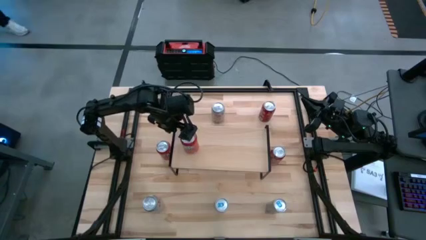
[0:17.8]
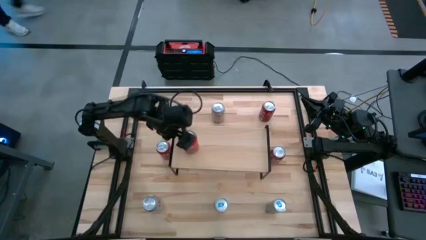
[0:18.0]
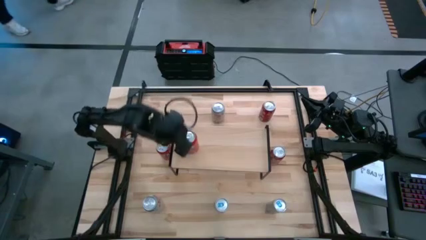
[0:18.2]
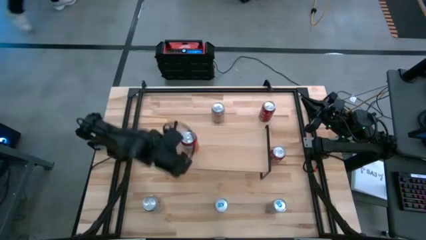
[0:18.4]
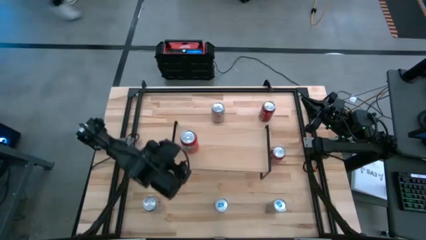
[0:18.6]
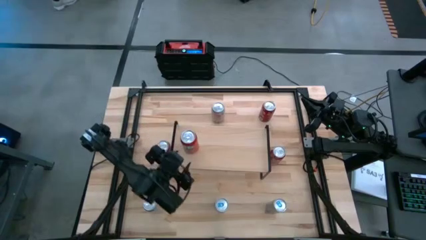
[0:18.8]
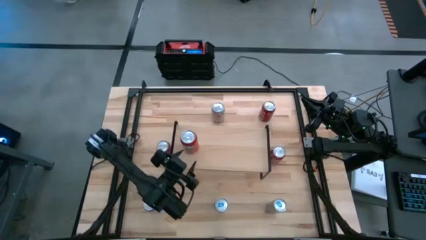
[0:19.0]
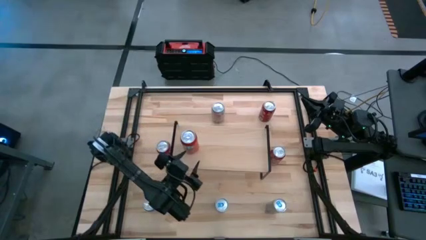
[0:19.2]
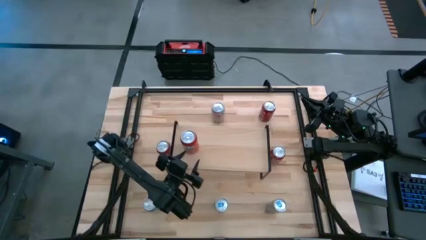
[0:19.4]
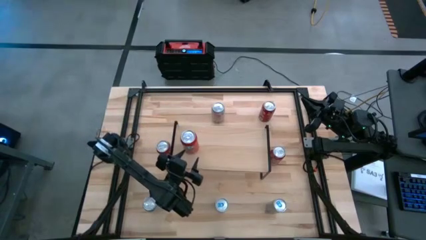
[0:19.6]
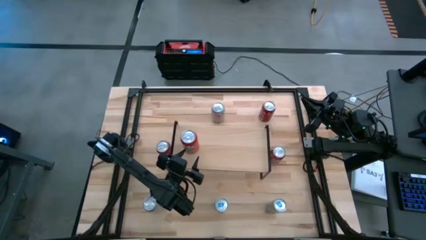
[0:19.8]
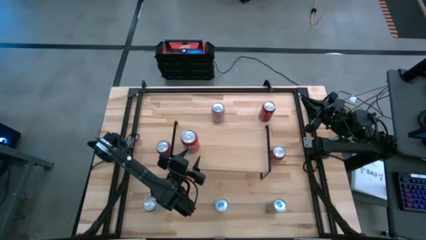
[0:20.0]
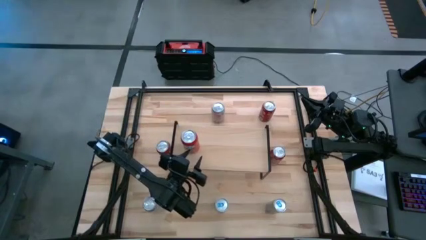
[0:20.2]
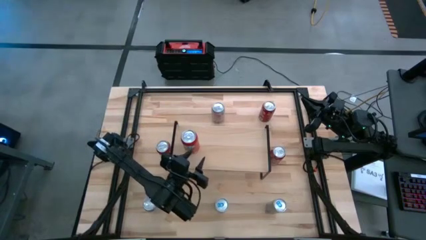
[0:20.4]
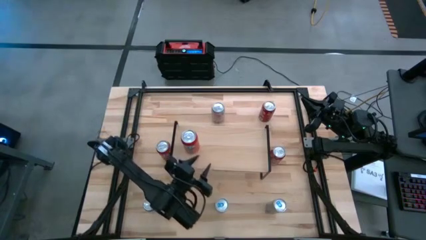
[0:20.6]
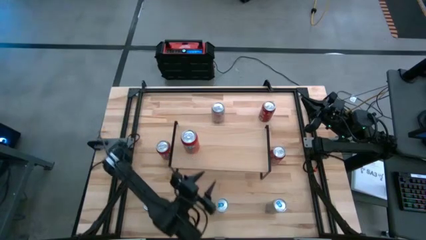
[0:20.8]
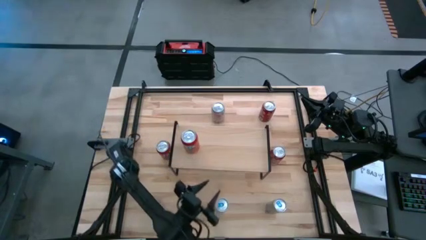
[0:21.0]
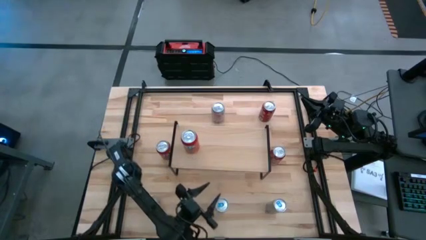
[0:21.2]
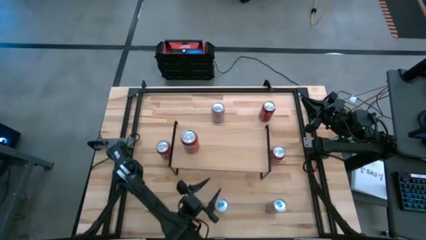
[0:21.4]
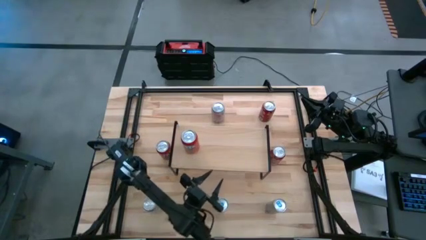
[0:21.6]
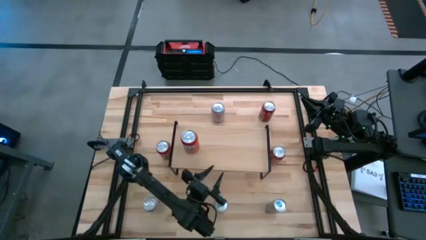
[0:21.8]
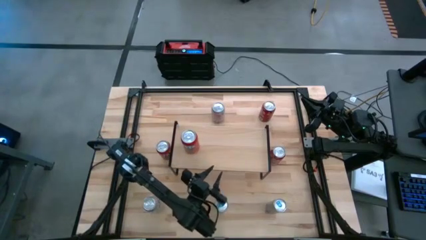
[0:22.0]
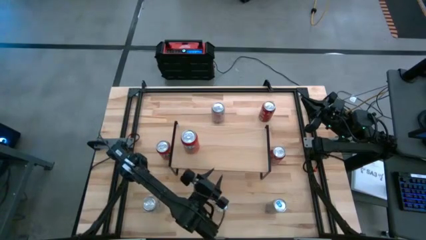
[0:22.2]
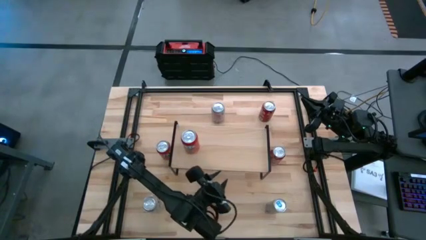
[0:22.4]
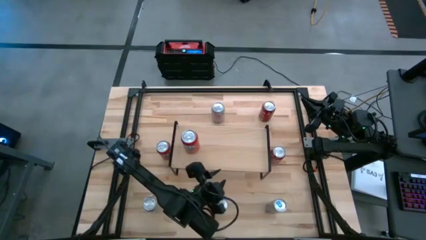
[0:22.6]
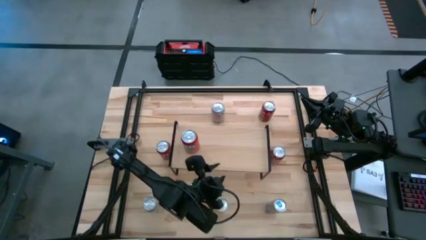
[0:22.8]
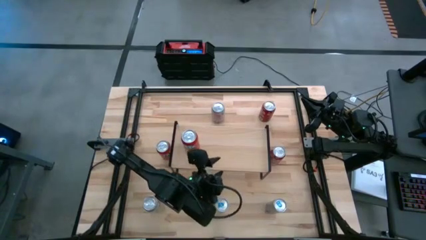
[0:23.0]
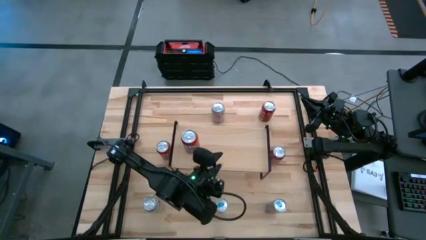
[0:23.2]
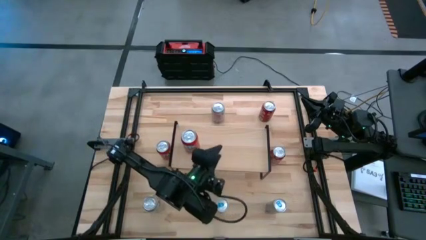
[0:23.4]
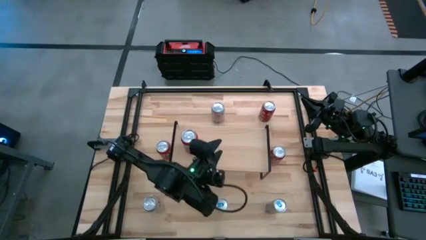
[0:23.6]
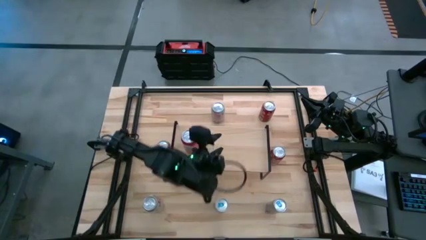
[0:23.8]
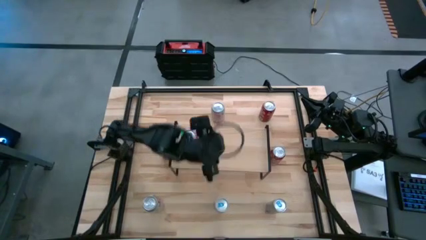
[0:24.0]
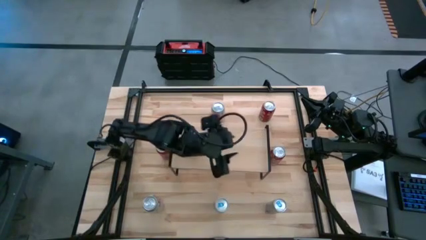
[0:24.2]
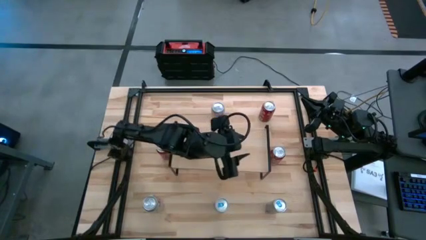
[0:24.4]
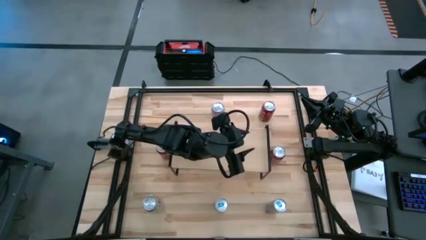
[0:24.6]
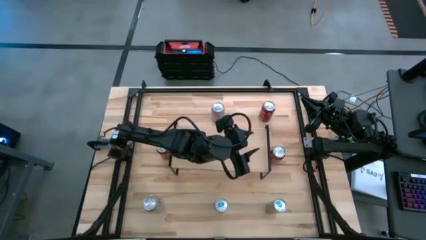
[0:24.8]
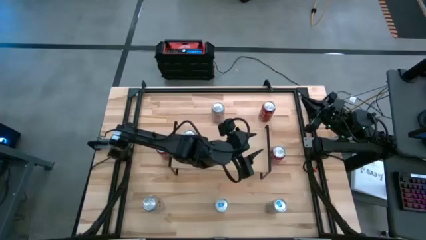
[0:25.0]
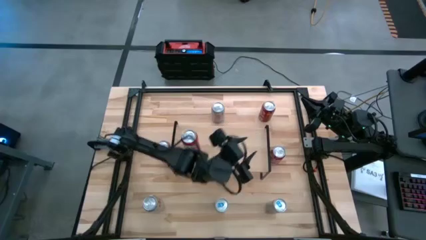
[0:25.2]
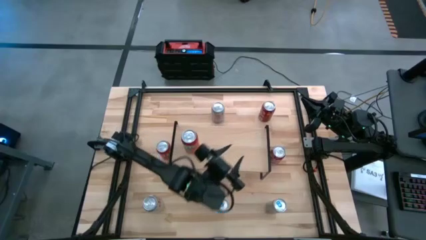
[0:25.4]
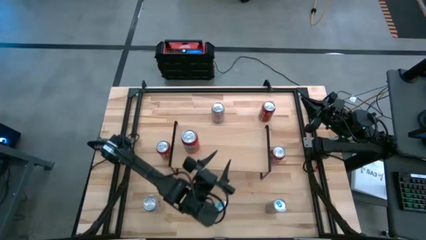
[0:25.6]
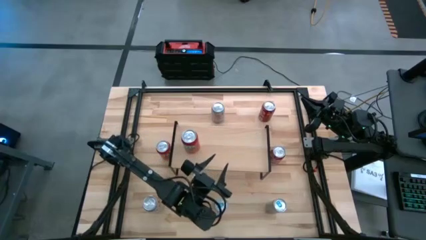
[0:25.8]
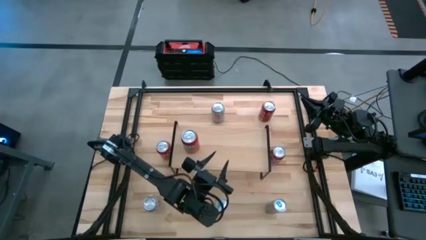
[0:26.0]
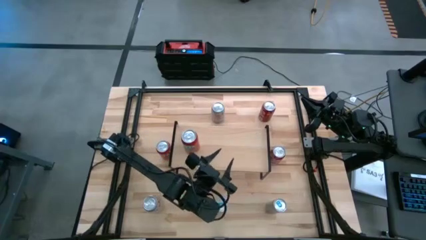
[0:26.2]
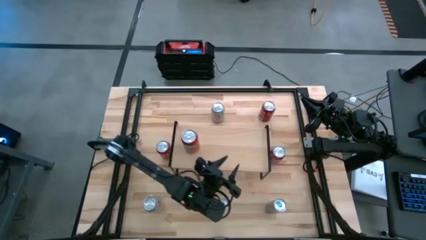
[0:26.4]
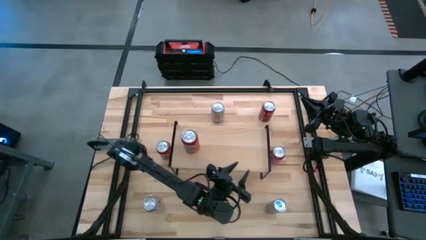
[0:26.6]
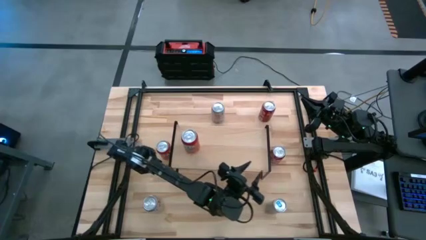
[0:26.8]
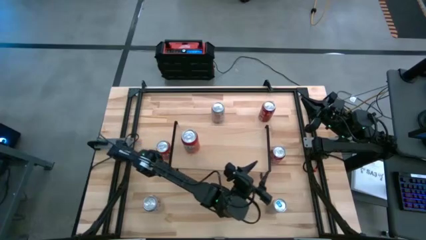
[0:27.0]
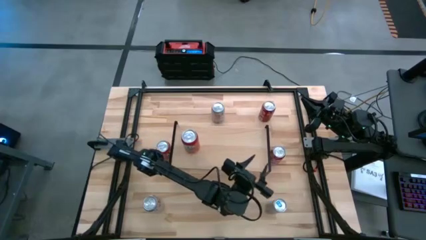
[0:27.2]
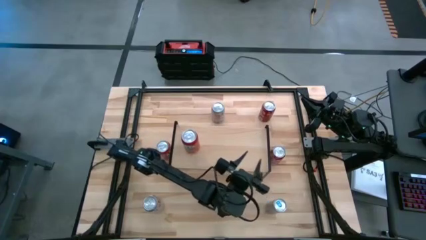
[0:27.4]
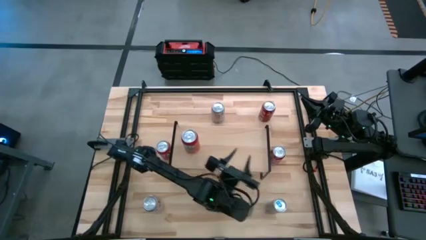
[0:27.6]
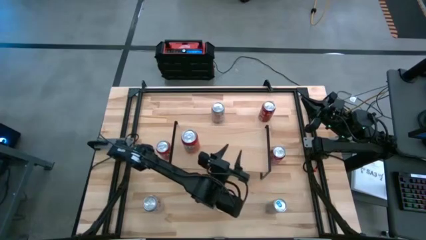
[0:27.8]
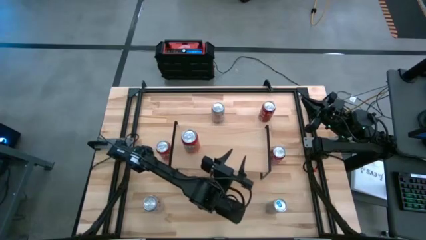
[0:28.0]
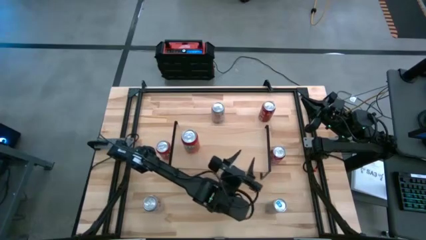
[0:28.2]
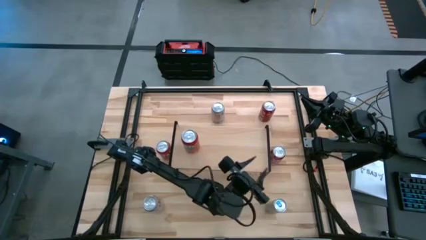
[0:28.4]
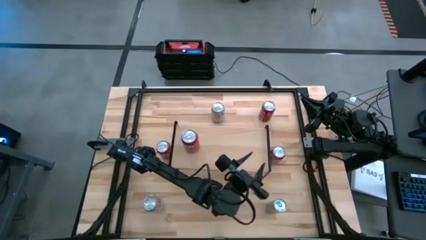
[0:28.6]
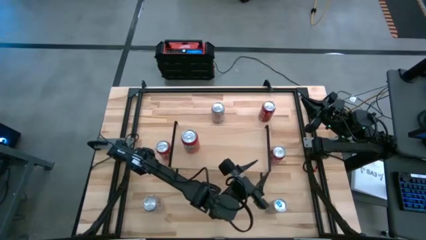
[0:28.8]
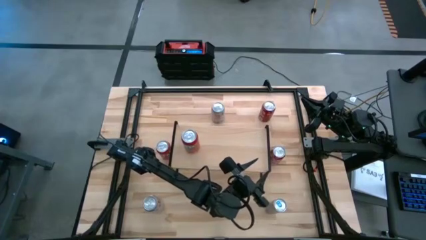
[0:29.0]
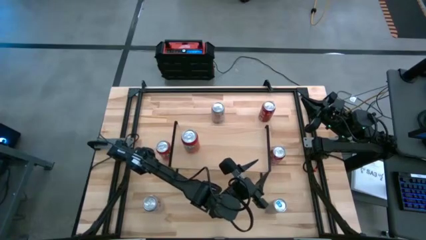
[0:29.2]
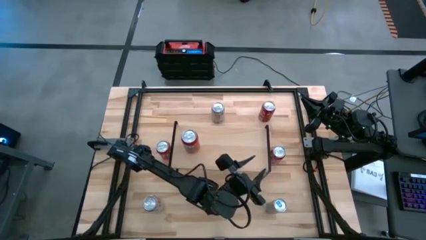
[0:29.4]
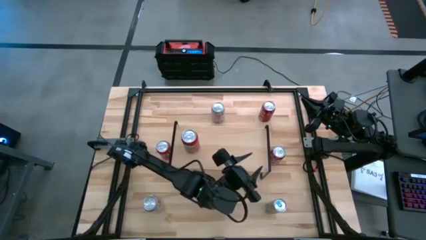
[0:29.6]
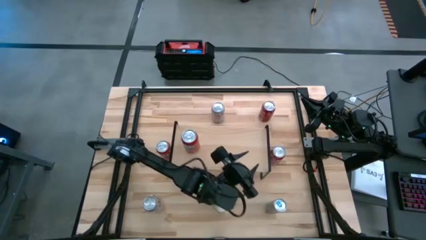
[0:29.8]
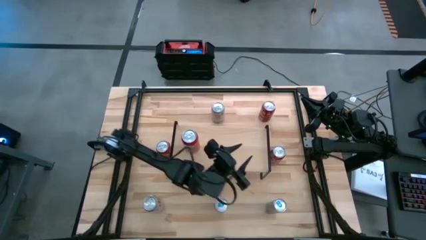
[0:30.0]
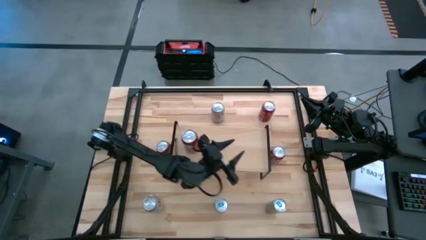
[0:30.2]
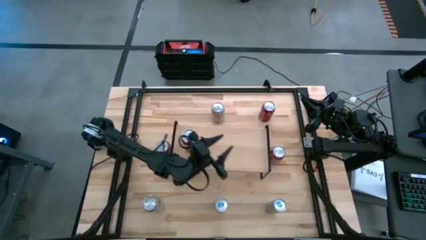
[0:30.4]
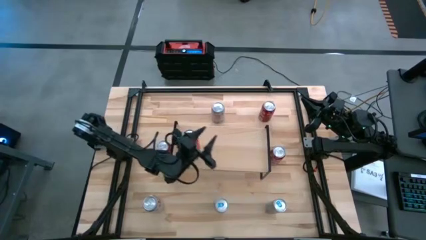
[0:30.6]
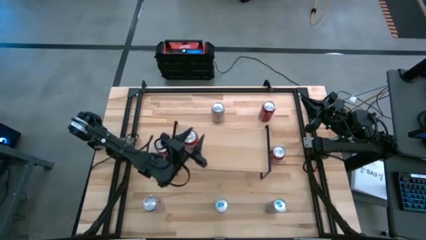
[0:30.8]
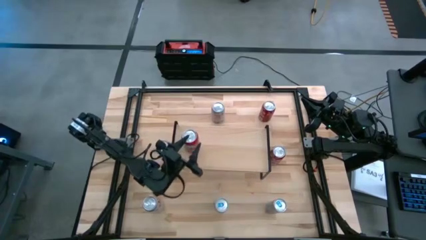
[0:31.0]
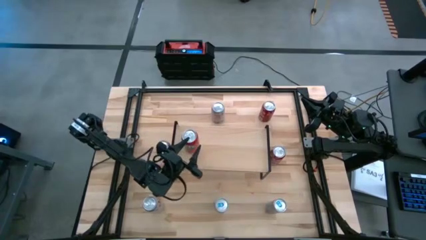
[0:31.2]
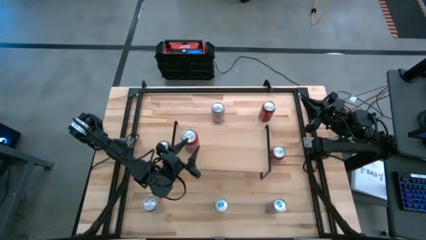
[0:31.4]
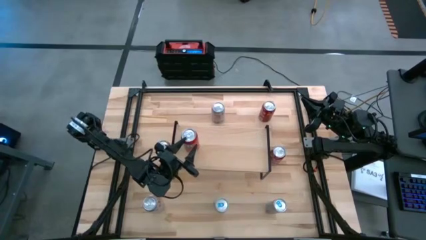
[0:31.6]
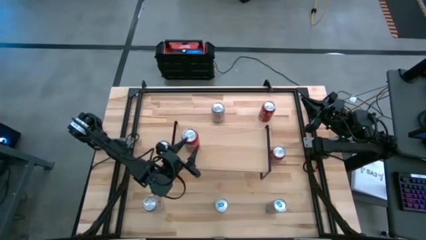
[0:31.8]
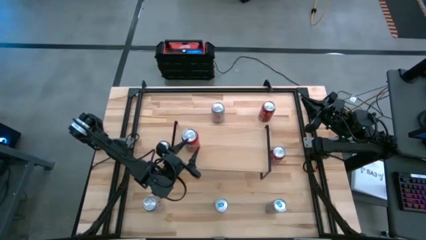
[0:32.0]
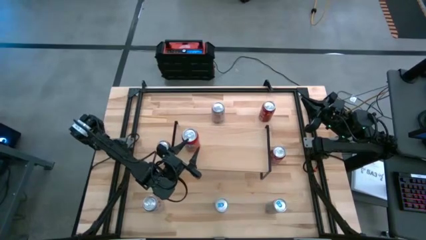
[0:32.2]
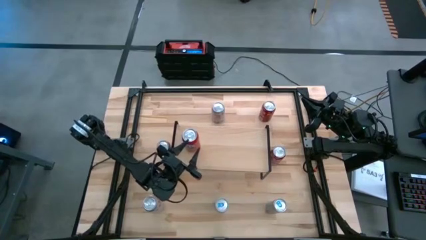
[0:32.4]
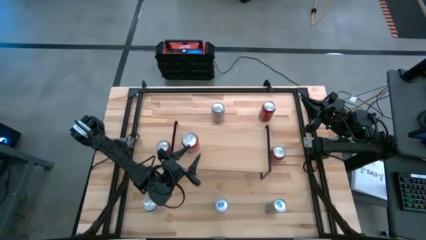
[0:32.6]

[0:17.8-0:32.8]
Task: Place canned beverage on shelf
Put the top orange soda can on the shelf

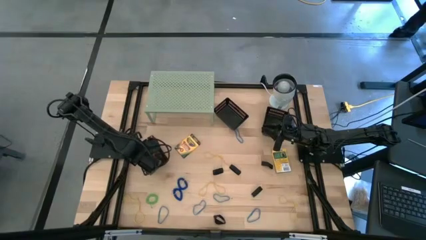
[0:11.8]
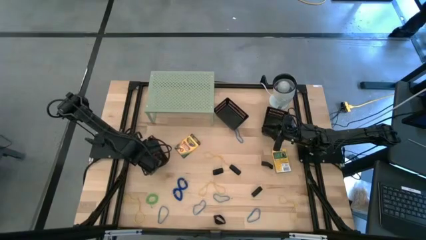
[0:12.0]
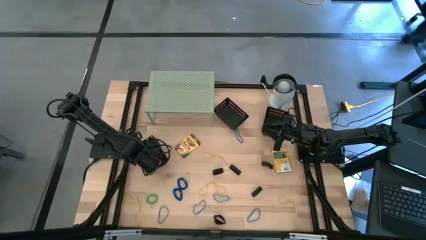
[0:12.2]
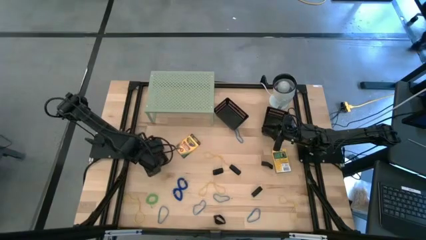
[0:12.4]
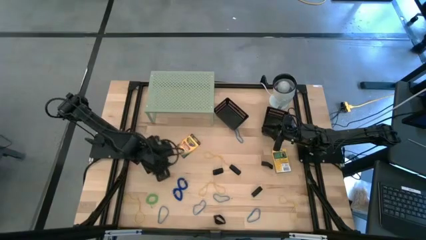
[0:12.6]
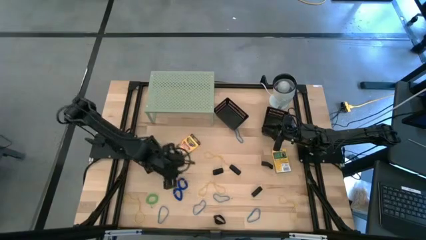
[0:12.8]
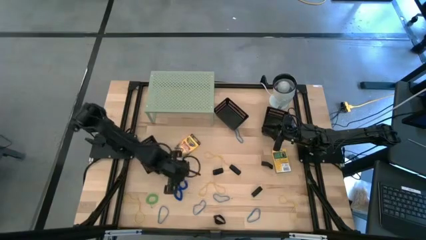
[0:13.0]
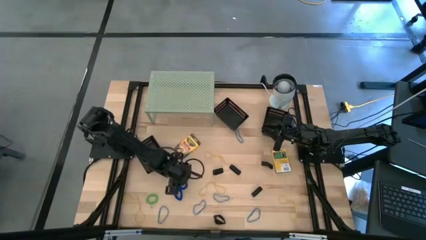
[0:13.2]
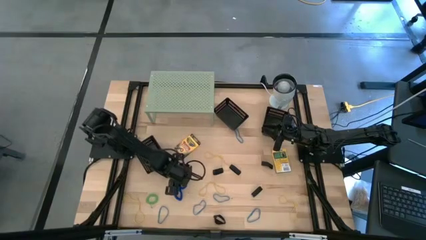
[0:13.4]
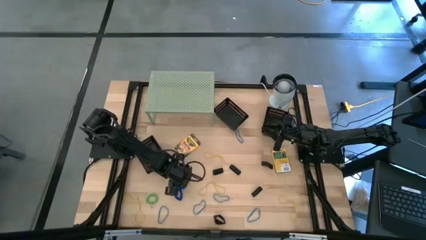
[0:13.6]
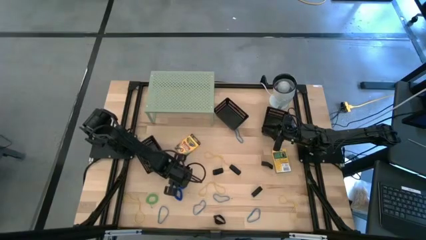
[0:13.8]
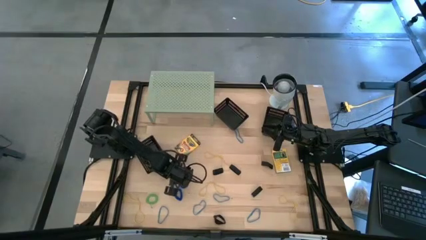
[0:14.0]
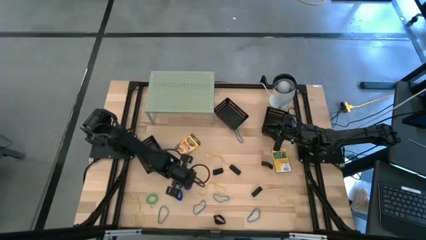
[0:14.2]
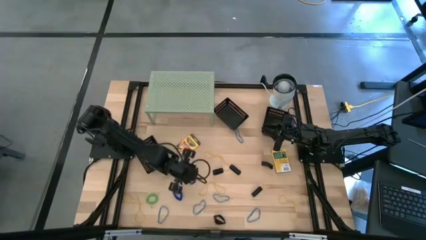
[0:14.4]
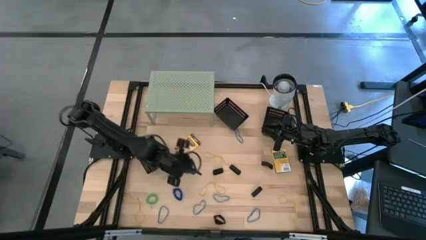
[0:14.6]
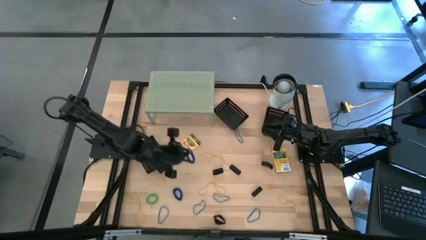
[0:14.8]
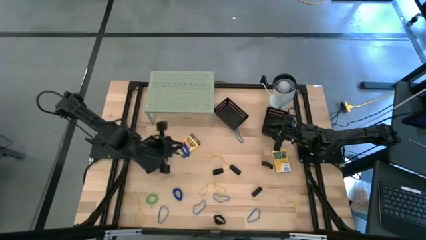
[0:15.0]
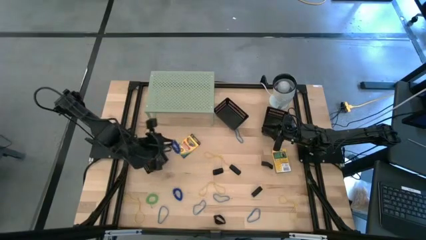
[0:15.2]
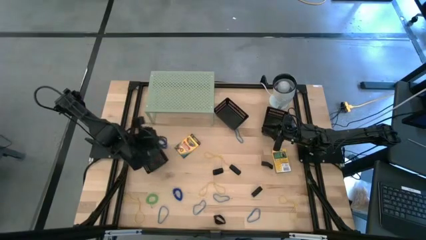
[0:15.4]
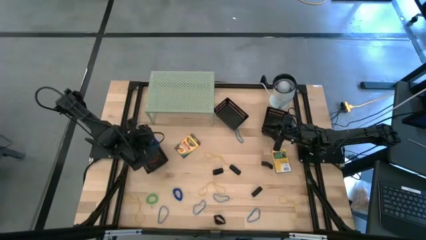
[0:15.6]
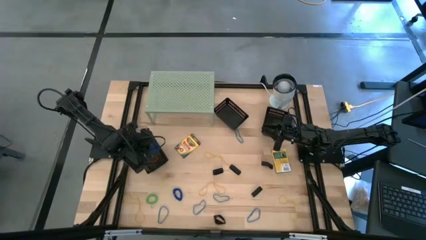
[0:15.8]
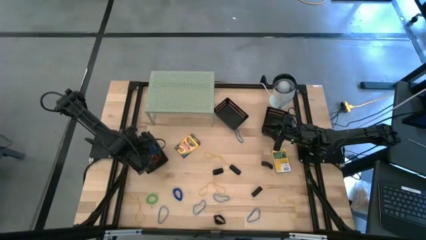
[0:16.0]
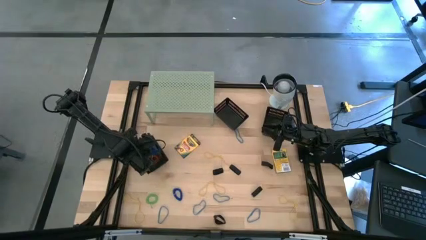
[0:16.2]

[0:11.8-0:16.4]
Task: Pick & Place Office Desk Supplies
Put the blue keychain into the bottom black bin
